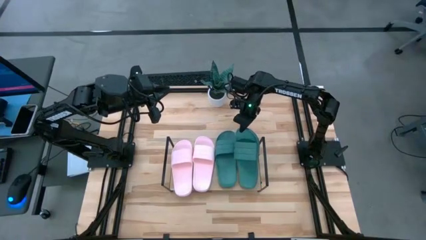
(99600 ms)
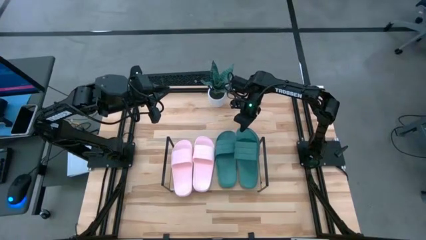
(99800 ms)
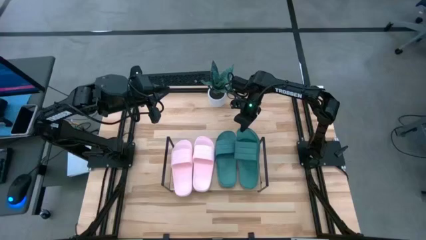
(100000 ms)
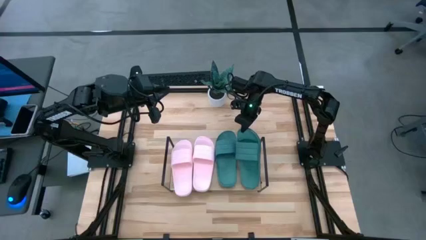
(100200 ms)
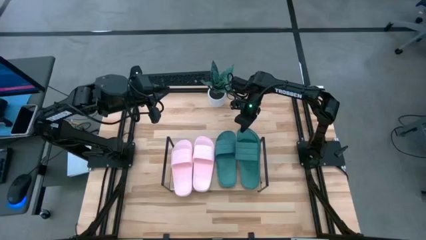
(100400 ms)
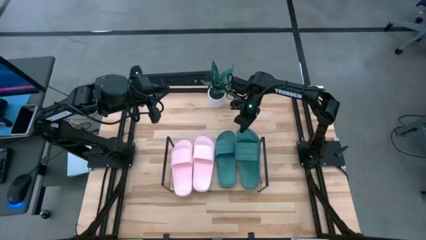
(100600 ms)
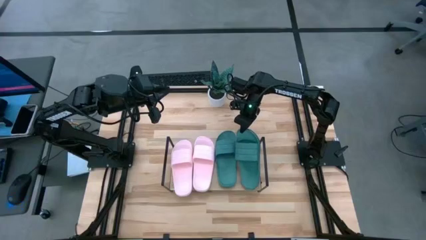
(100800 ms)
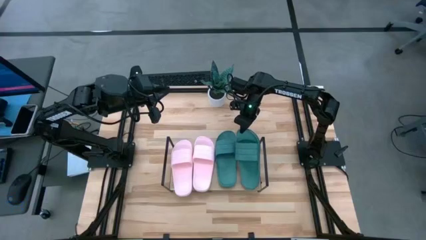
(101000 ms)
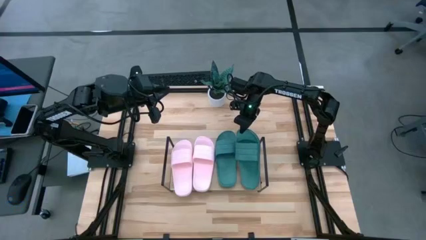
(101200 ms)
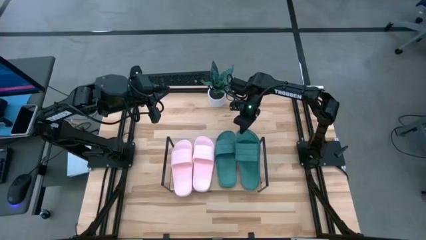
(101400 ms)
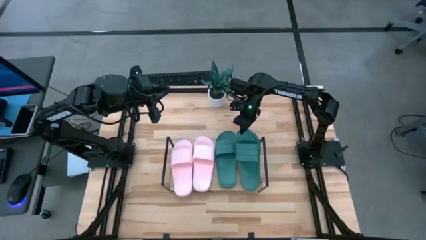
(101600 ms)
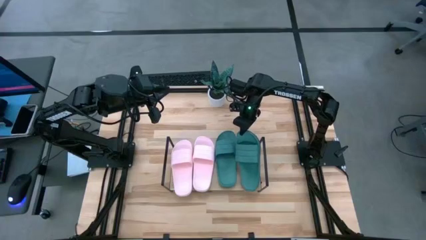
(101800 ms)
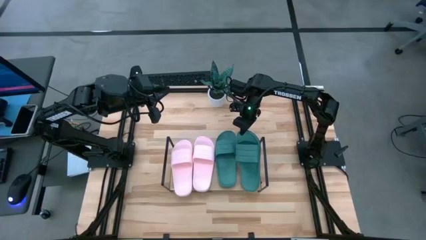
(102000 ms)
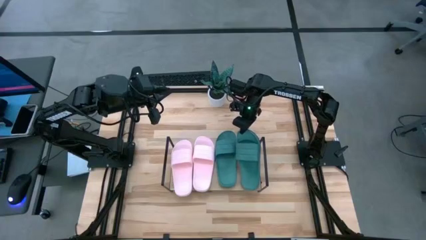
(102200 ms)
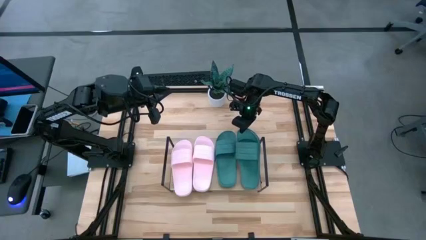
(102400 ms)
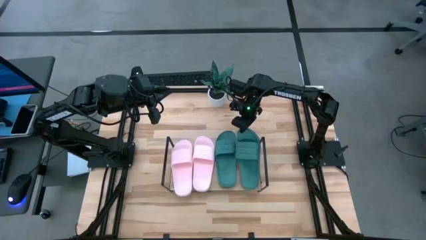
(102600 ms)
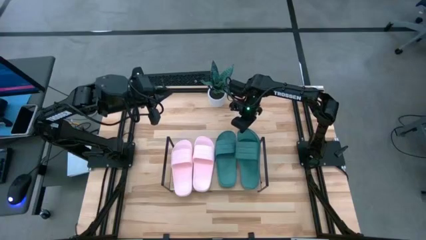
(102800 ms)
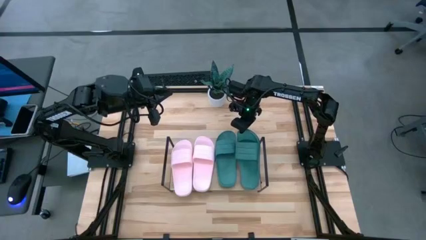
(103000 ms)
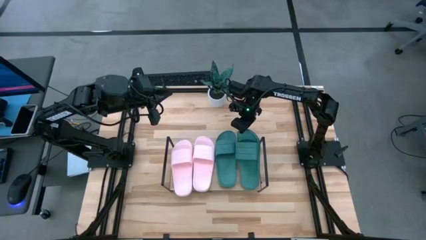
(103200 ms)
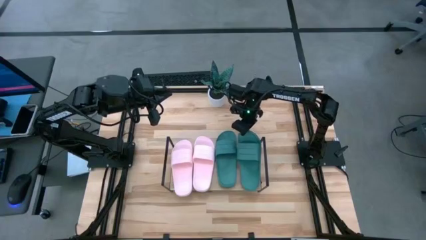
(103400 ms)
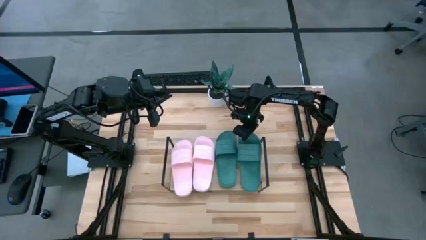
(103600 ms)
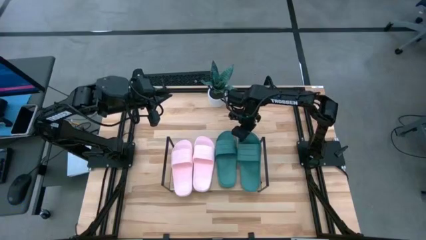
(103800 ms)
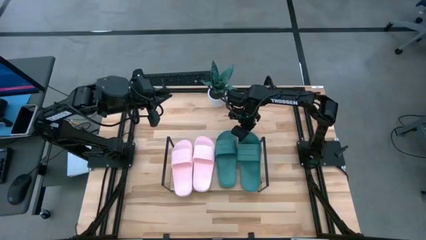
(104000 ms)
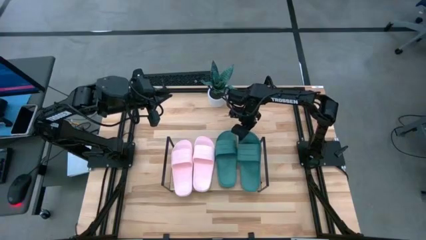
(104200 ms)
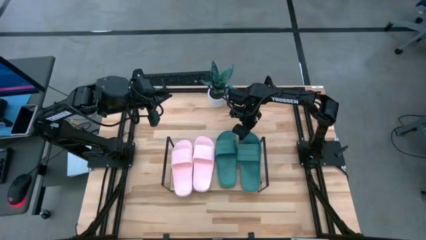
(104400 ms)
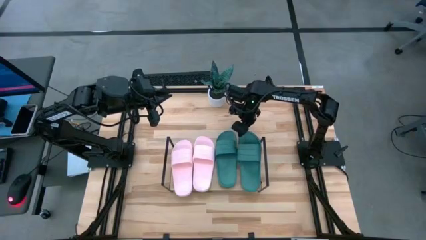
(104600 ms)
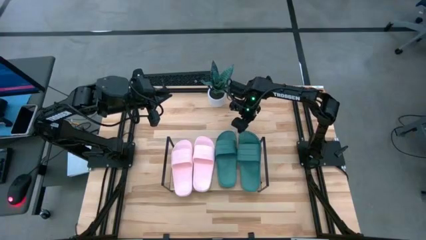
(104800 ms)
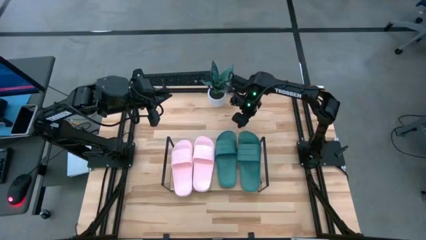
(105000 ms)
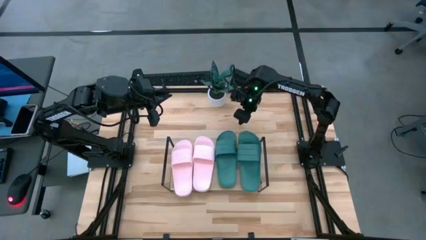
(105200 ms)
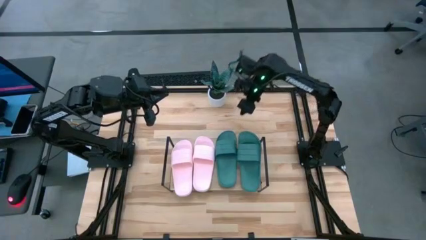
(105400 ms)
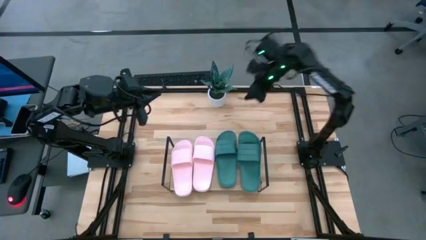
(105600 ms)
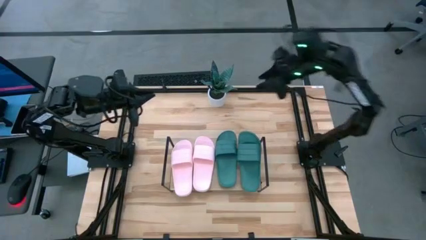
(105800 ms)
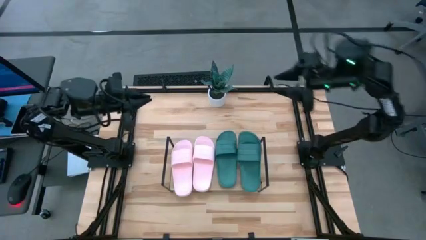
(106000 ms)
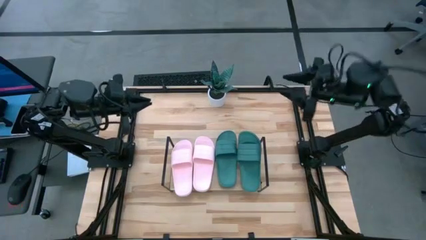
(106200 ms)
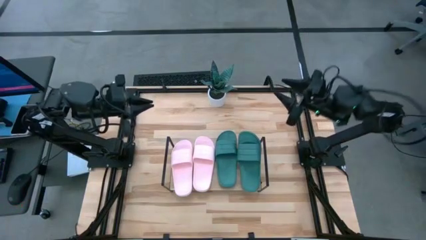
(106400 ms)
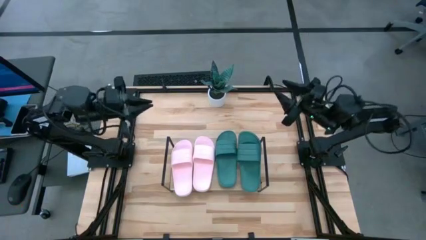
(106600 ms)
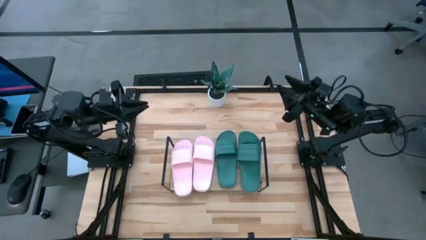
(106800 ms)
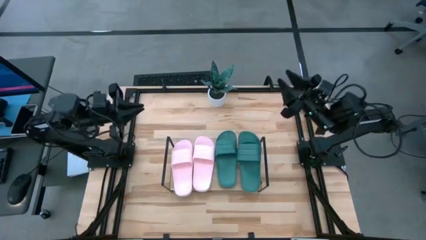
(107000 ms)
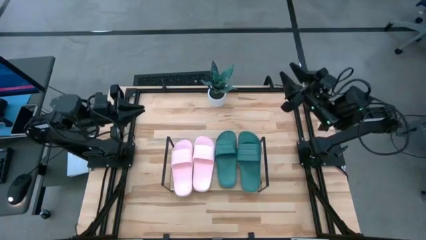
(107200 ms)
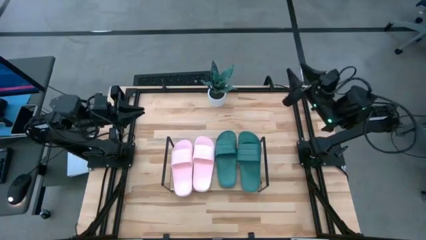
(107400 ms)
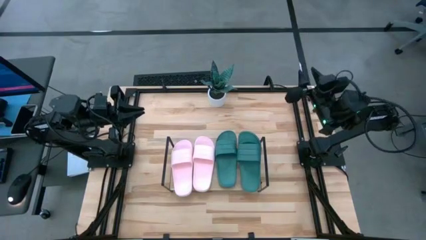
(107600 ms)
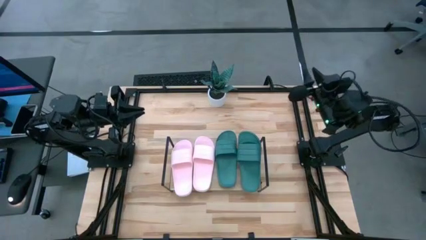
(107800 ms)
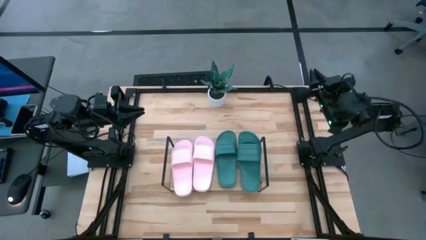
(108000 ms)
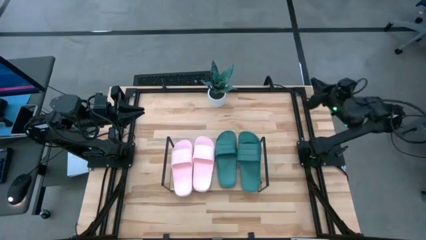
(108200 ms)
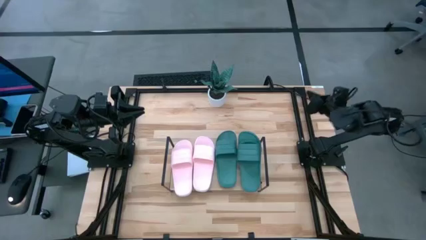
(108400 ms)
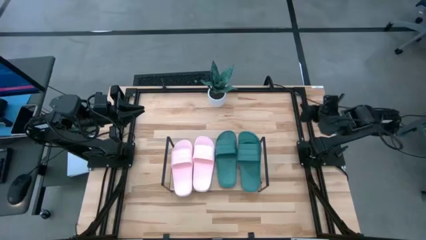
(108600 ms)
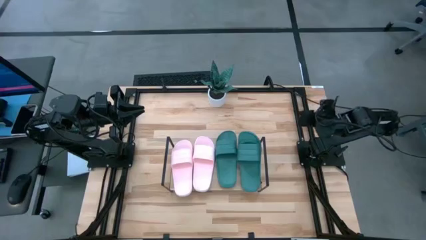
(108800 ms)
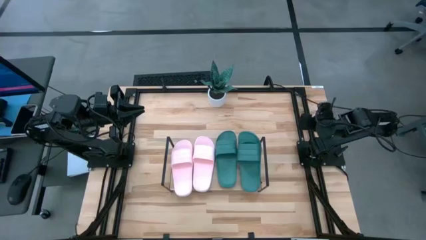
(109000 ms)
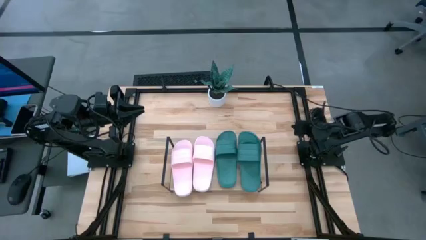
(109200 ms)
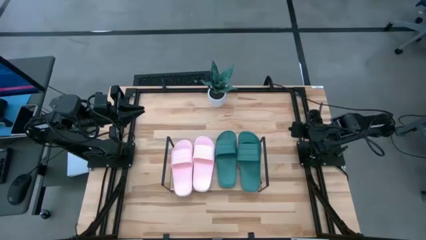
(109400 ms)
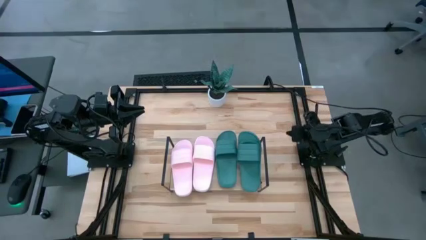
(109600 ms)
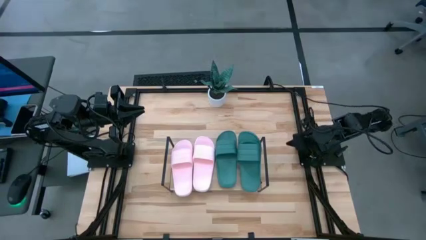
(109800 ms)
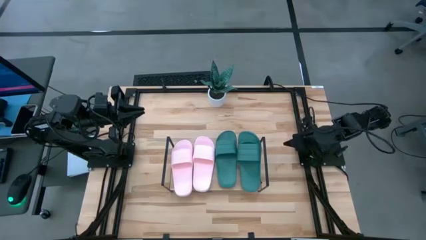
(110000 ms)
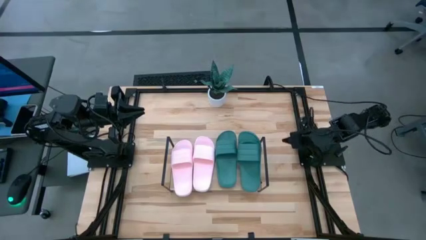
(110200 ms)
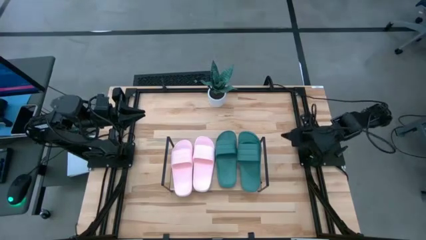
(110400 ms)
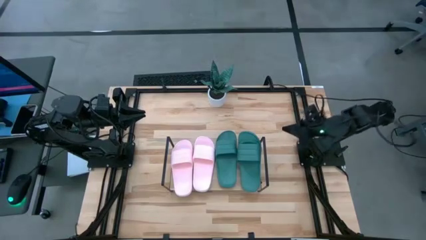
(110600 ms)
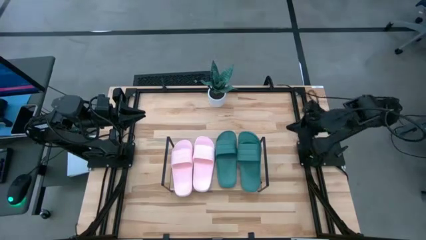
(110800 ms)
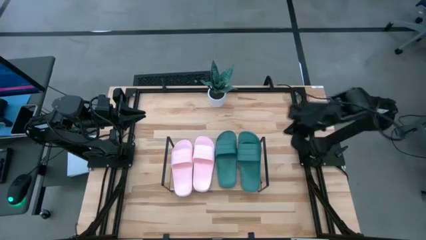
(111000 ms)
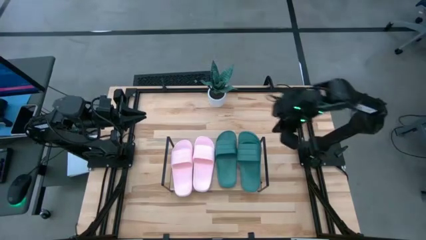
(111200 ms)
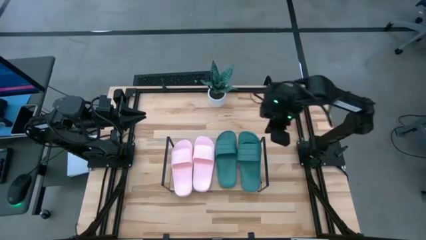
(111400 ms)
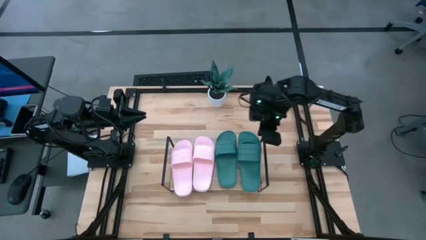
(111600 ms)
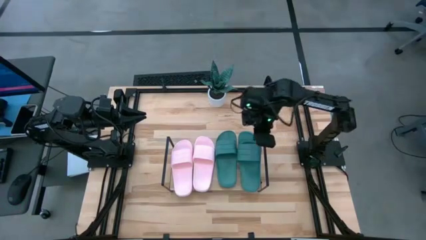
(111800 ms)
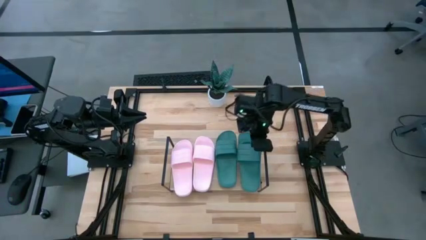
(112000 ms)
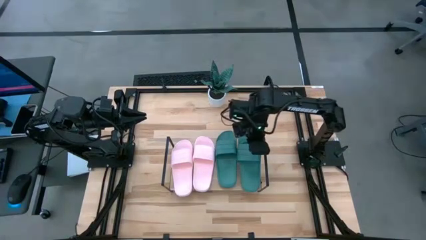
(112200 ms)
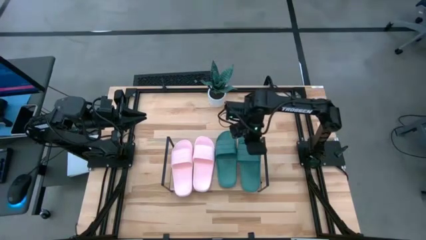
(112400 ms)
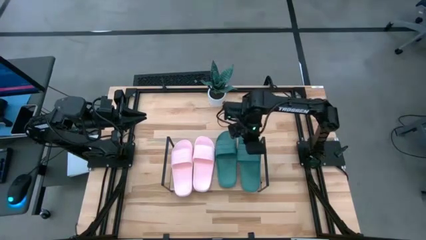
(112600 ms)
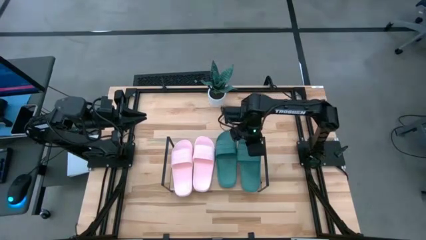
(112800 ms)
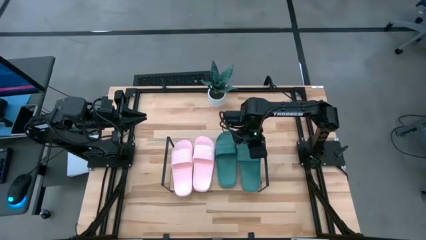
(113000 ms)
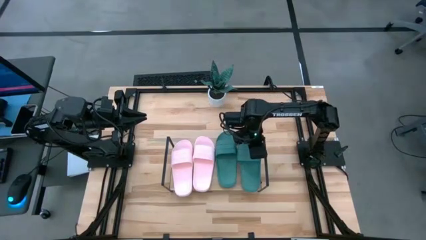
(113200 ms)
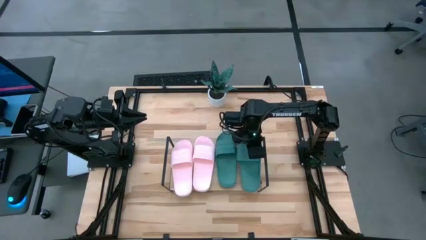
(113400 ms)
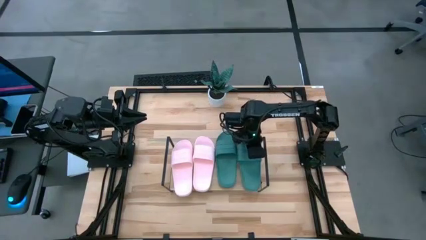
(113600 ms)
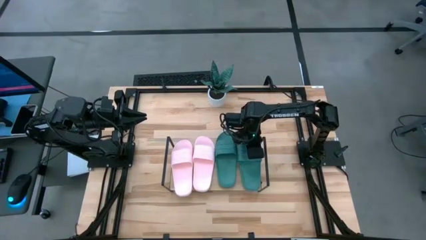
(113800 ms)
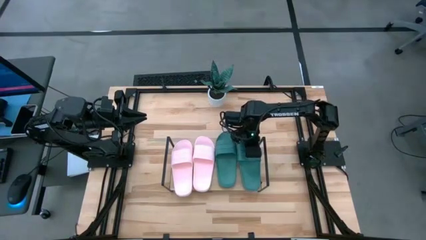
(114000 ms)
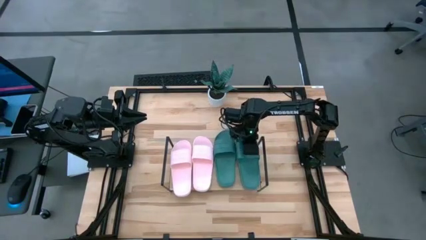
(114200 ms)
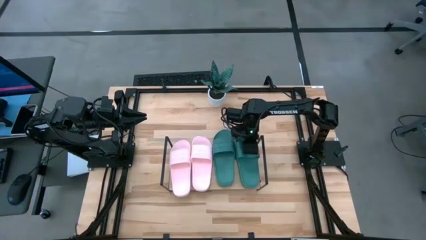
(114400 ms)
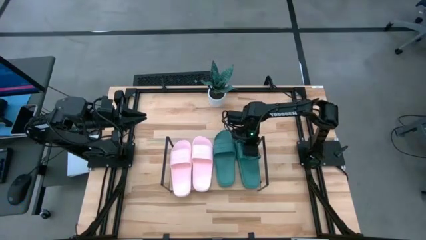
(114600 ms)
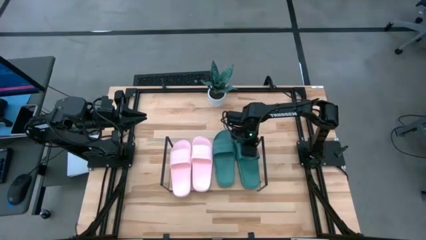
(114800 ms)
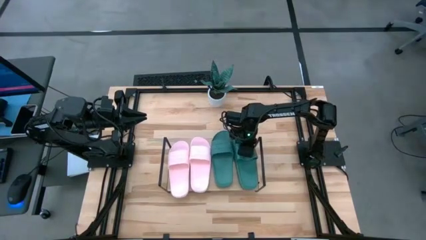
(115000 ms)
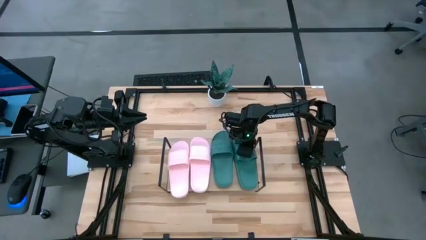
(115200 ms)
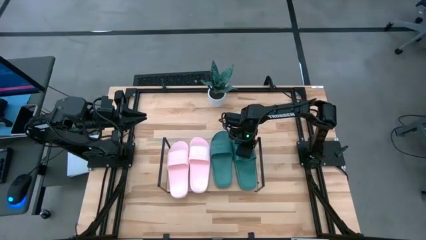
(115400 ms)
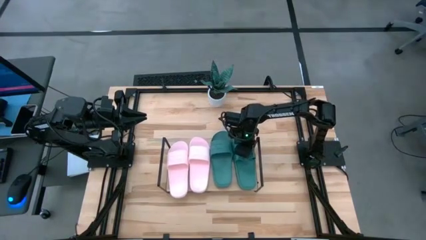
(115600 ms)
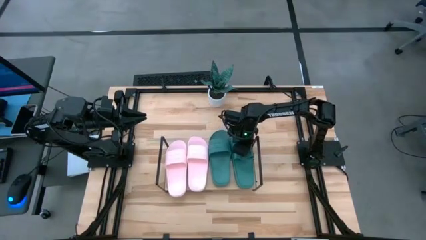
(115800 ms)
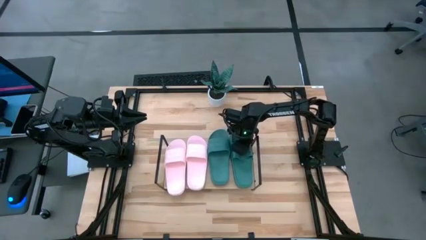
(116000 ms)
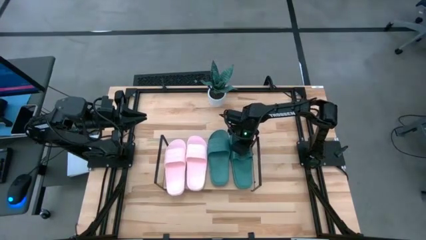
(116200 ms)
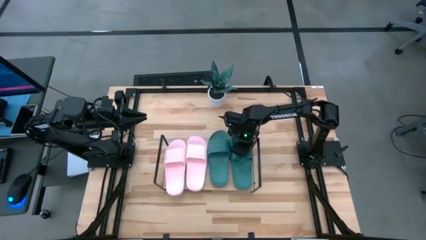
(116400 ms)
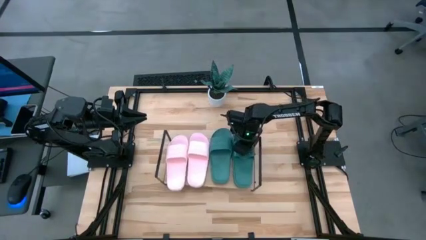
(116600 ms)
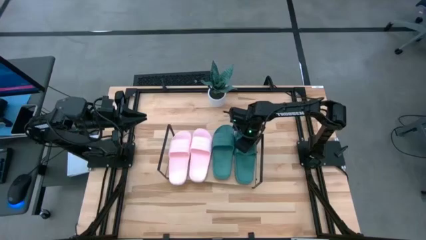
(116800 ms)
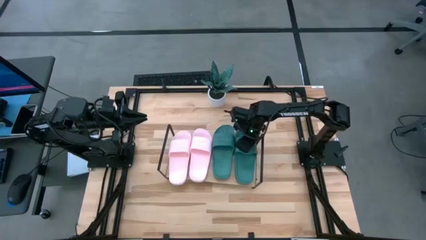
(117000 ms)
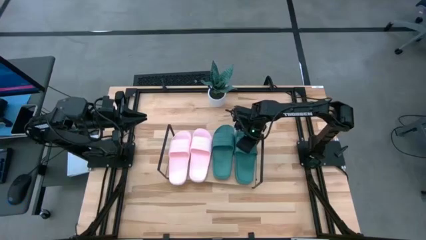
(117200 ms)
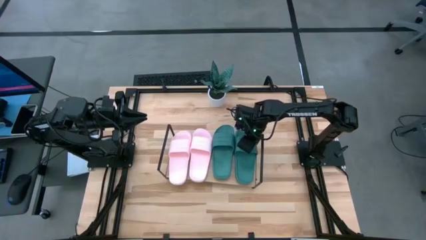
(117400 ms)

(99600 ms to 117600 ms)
Task: Pick and place slides into the shelf
Put the green slide on the shelf
